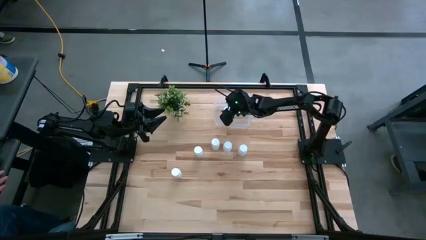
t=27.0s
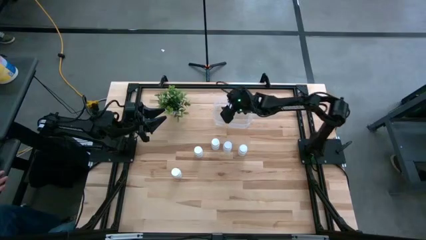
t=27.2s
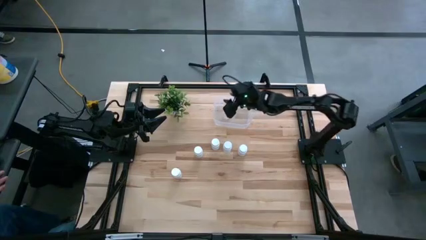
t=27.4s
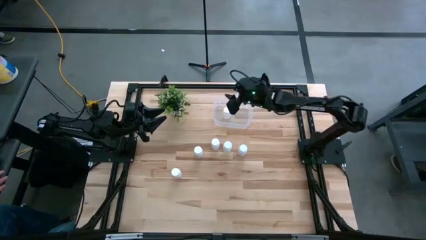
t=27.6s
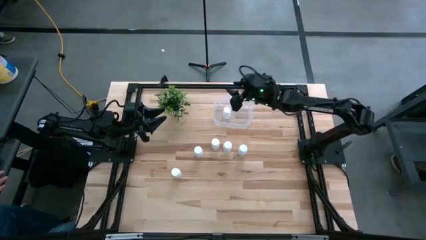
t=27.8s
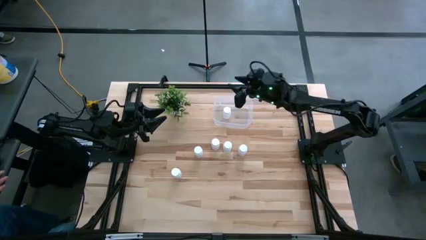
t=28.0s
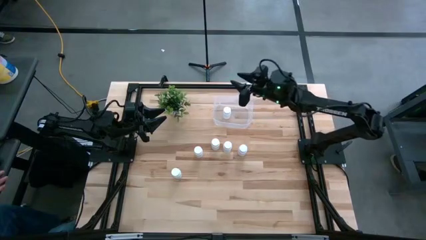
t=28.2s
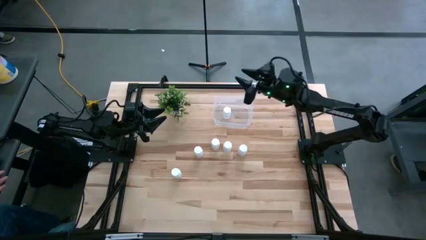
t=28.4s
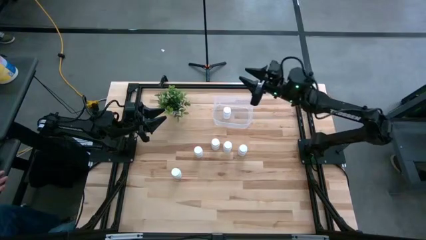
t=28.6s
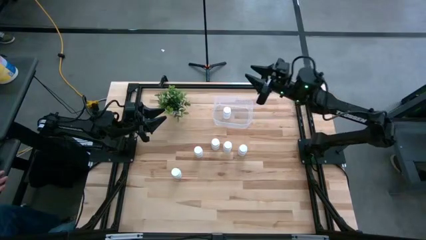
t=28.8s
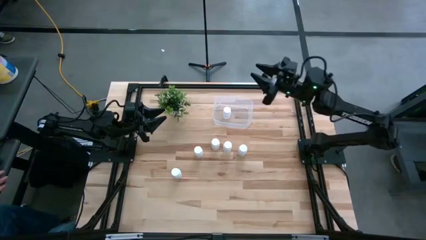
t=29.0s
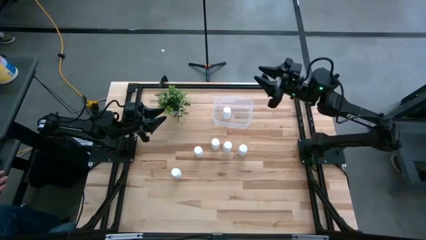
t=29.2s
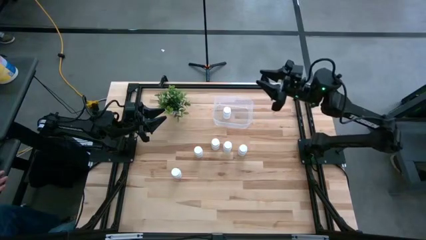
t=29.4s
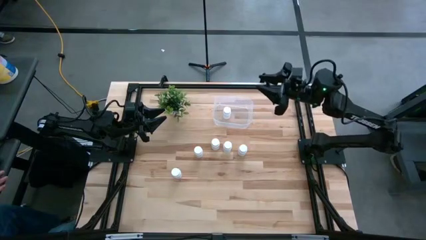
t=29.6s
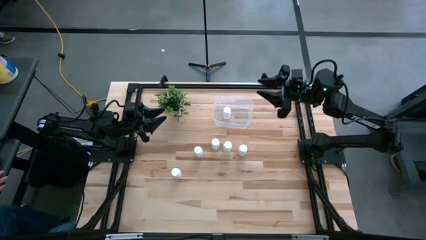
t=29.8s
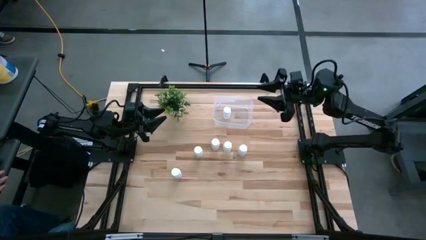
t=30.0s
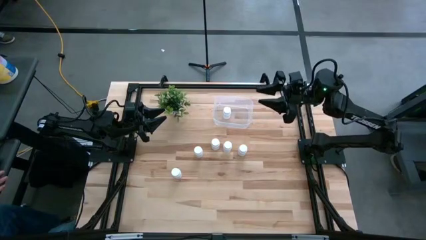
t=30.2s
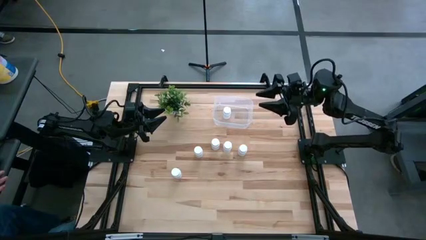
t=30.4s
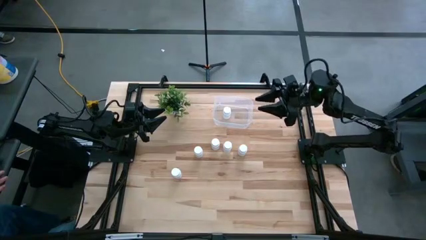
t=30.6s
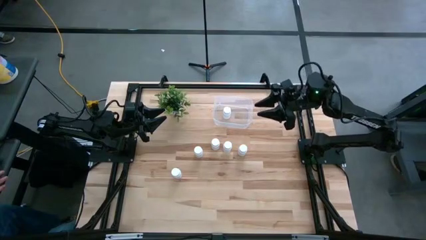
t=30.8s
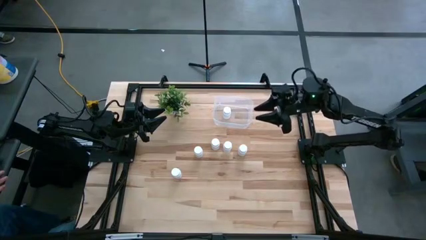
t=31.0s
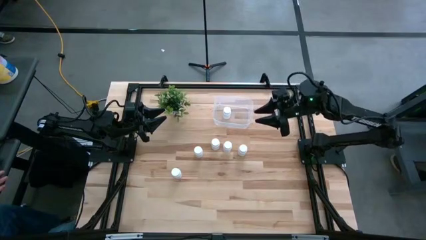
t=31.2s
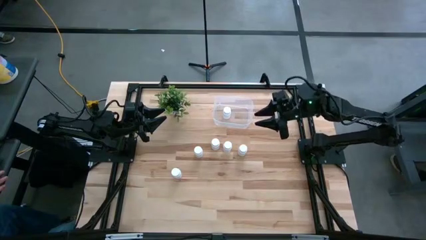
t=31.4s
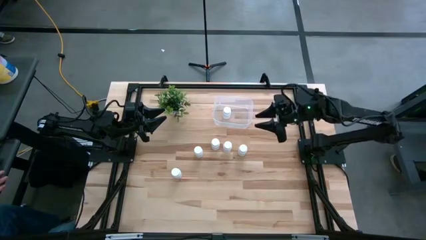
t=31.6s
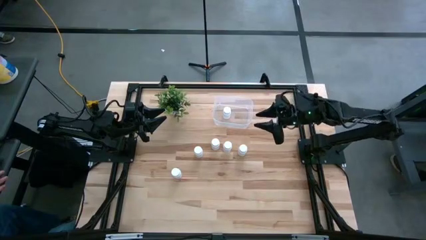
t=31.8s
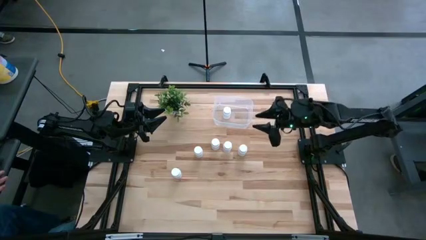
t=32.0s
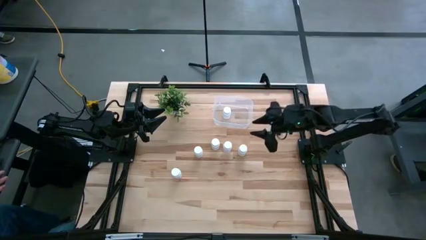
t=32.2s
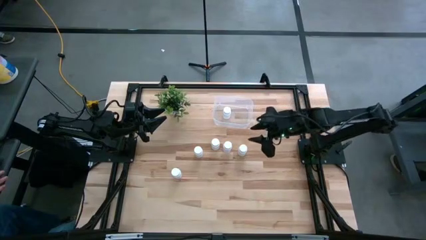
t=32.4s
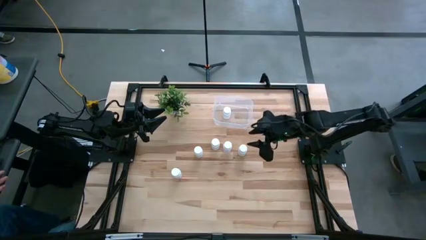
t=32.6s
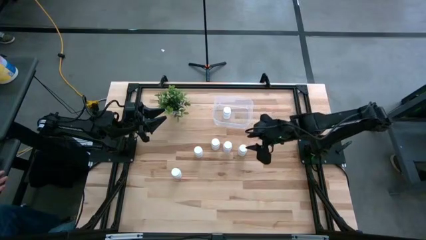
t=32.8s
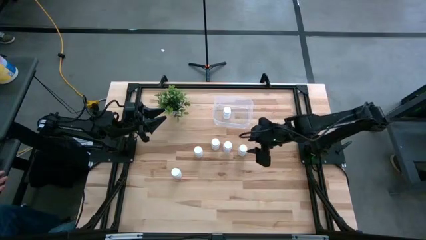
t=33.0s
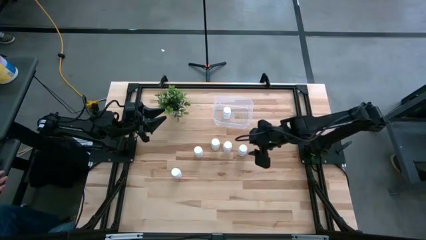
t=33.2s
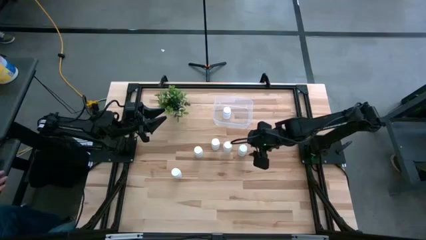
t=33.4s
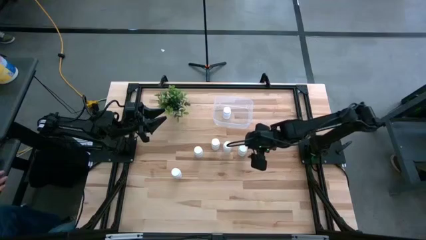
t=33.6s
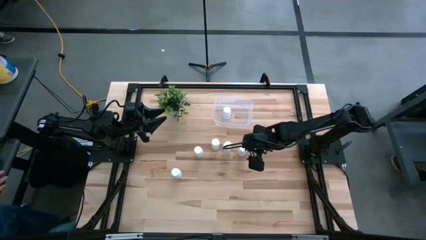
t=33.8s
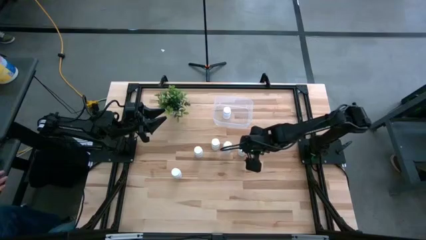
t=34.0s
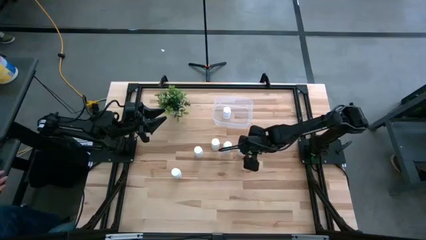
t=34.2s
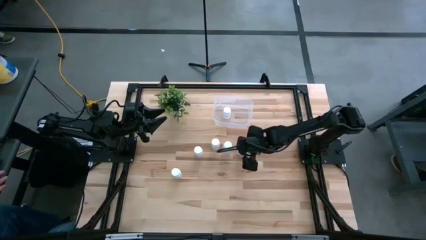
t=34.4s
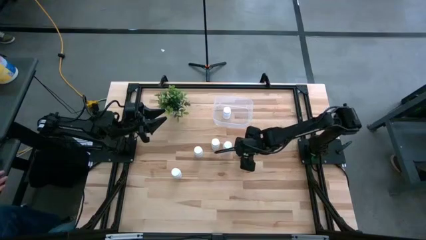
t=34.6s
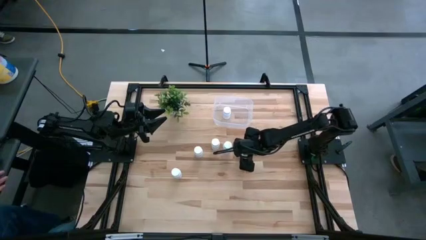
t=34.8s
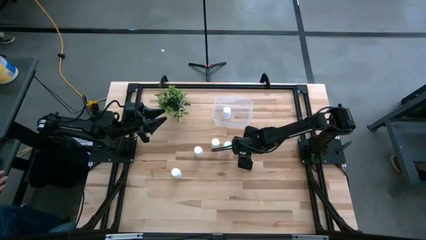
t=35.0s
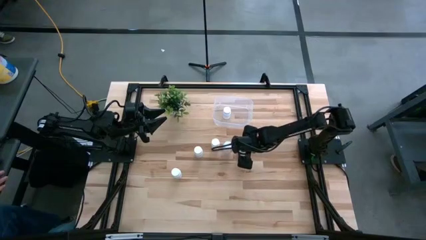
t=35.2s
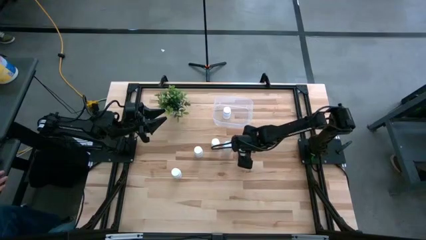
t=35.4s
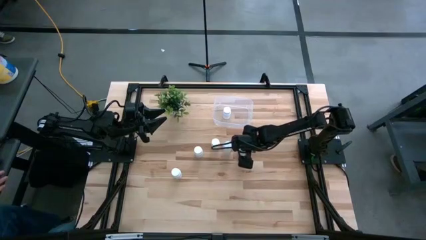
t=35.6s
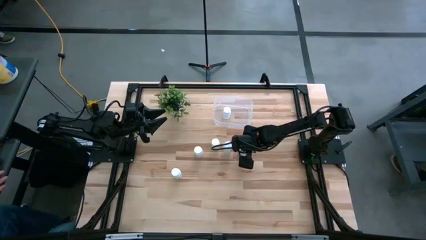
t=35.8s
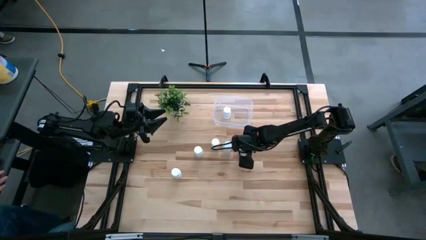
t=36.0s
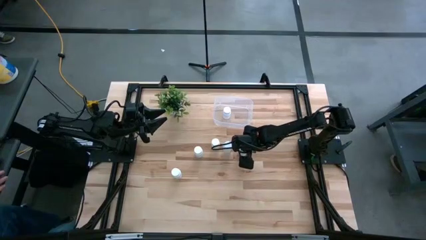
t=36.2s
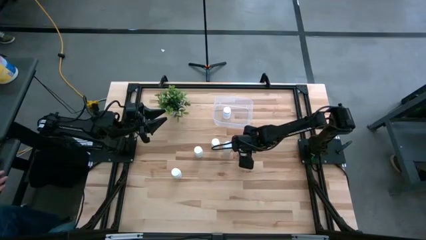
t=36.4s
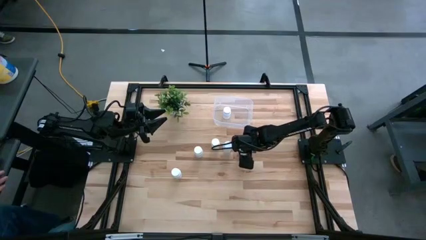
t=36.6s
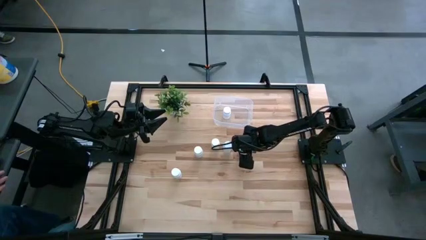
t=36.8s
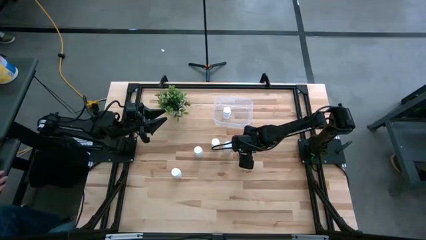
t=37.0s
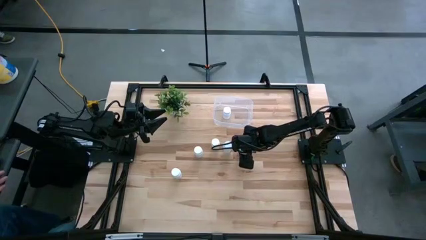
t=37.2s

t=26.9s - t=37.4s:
Task: Pick and place pill bottles into a basket
Put the white pill bottle into the transparent container
